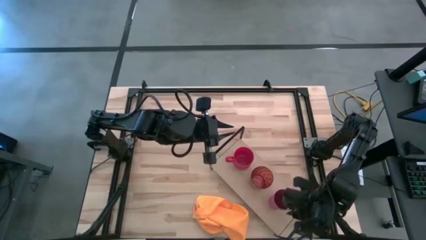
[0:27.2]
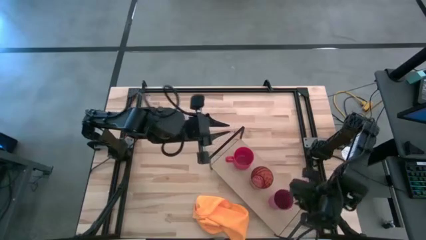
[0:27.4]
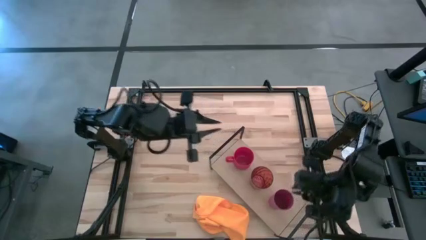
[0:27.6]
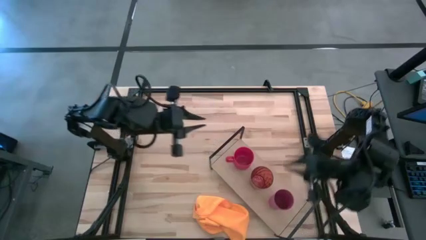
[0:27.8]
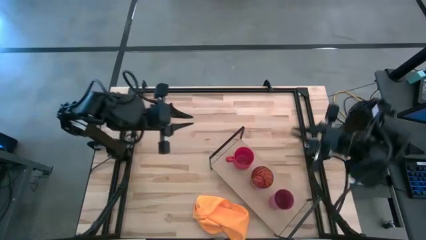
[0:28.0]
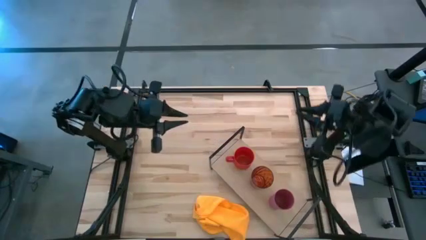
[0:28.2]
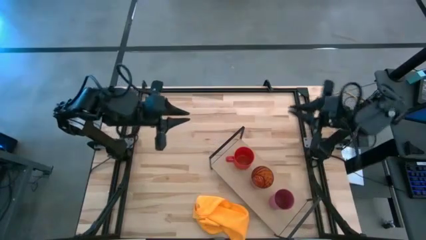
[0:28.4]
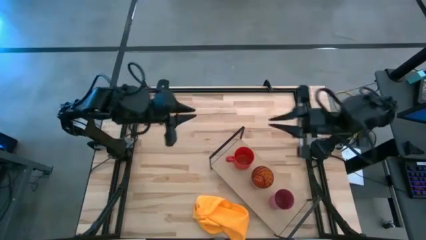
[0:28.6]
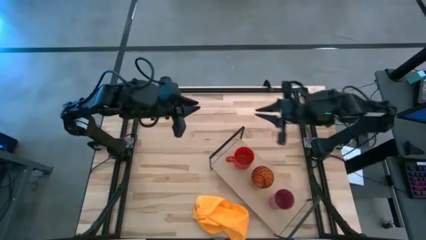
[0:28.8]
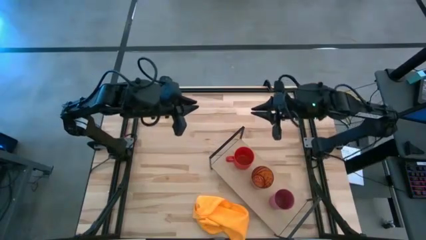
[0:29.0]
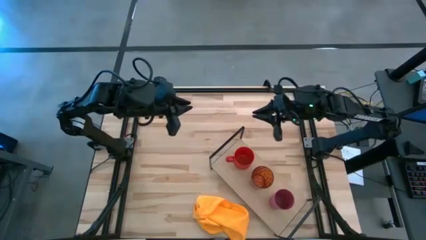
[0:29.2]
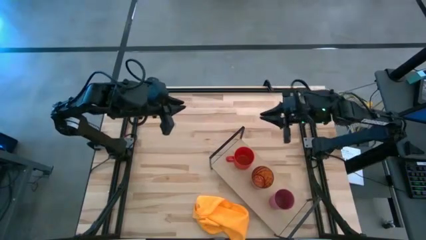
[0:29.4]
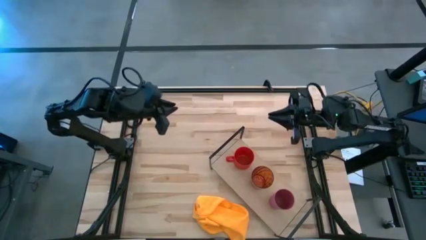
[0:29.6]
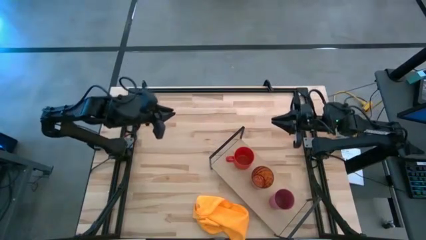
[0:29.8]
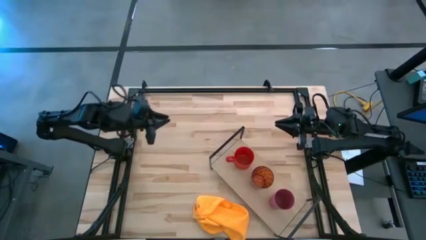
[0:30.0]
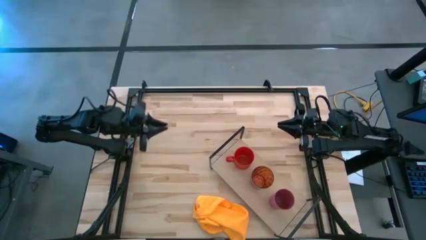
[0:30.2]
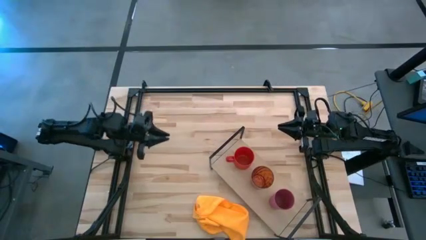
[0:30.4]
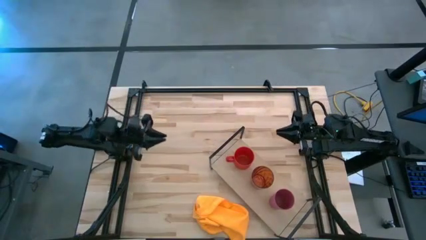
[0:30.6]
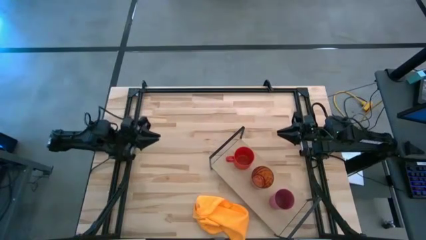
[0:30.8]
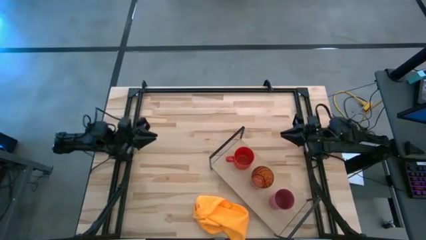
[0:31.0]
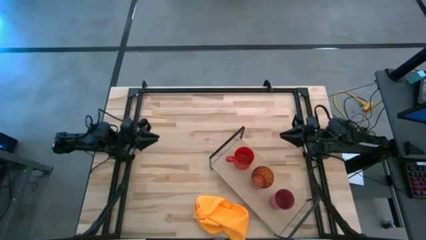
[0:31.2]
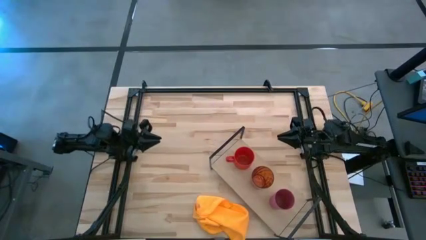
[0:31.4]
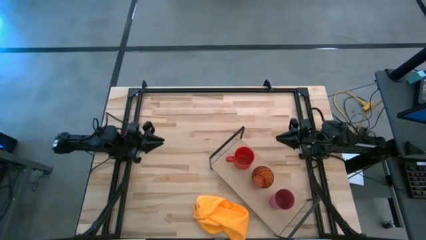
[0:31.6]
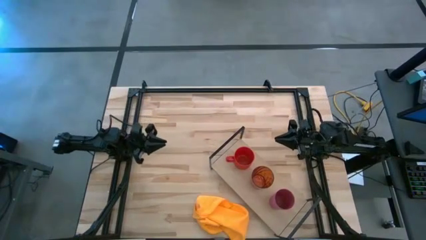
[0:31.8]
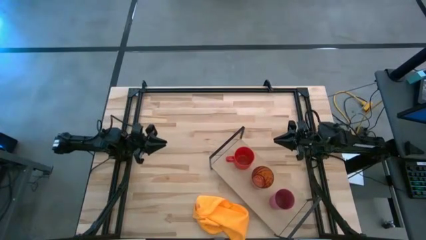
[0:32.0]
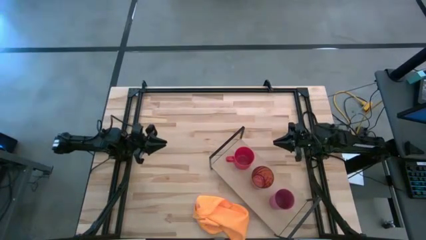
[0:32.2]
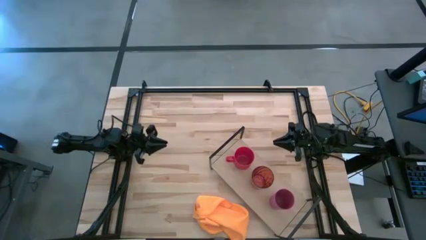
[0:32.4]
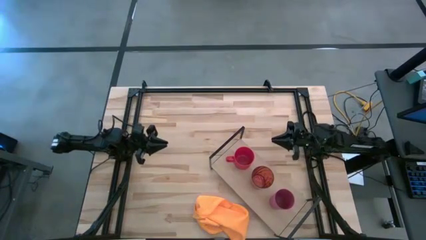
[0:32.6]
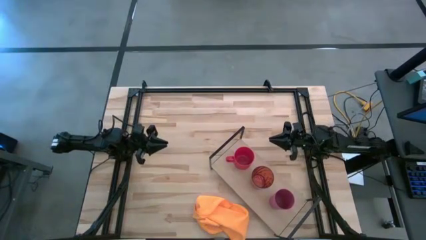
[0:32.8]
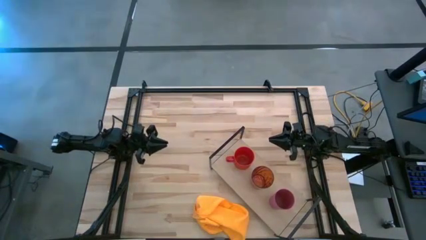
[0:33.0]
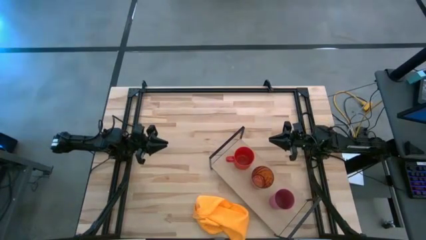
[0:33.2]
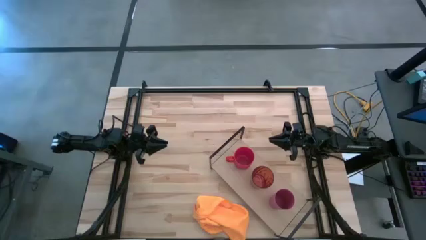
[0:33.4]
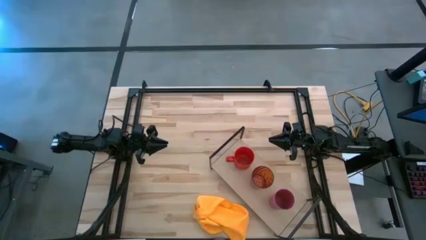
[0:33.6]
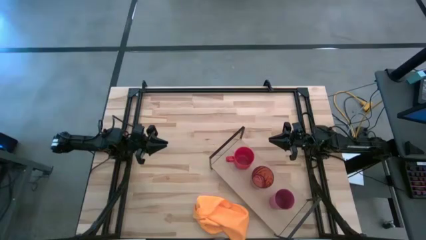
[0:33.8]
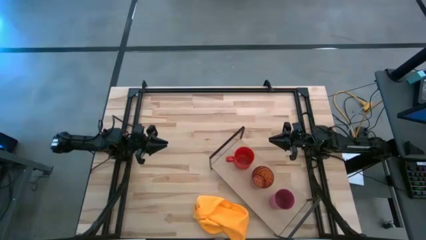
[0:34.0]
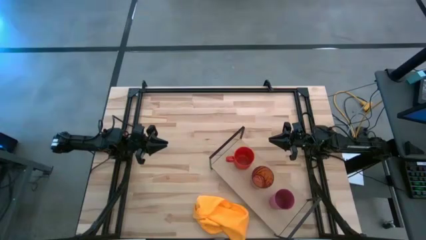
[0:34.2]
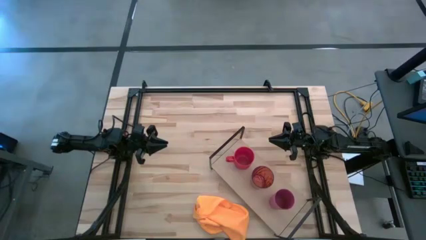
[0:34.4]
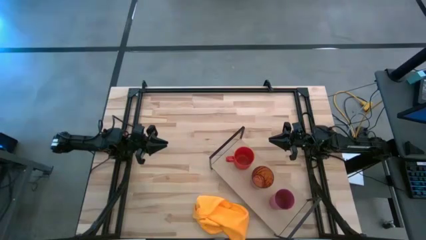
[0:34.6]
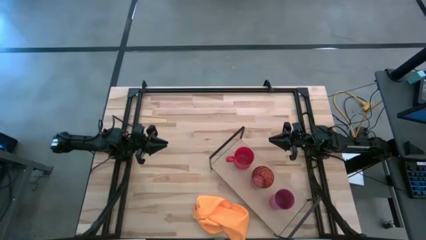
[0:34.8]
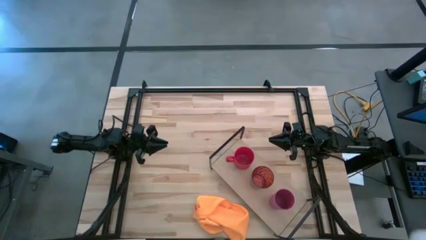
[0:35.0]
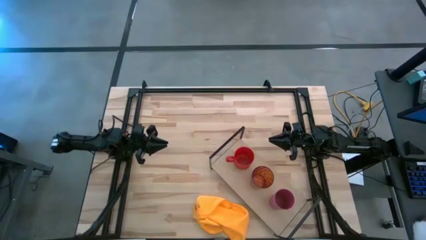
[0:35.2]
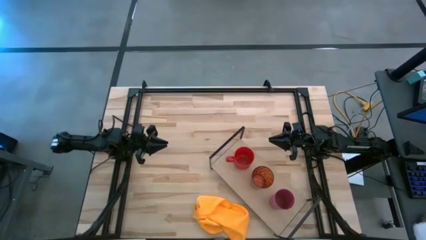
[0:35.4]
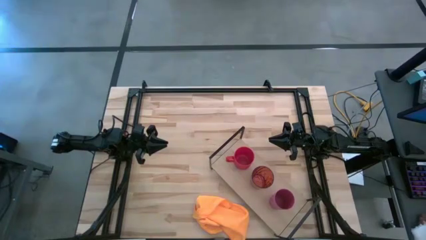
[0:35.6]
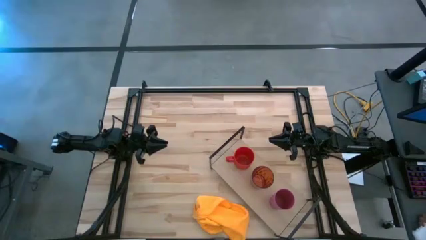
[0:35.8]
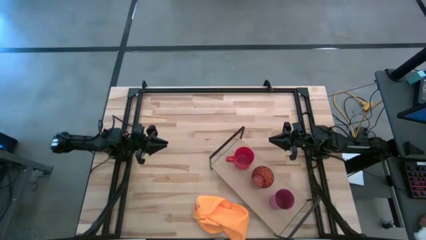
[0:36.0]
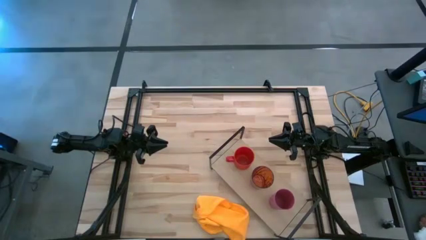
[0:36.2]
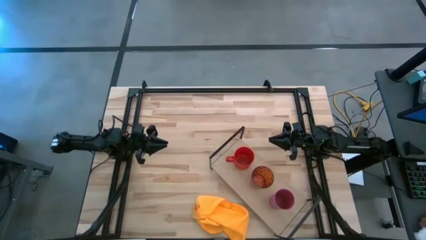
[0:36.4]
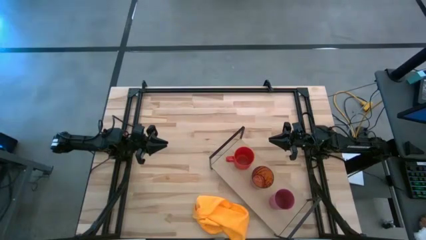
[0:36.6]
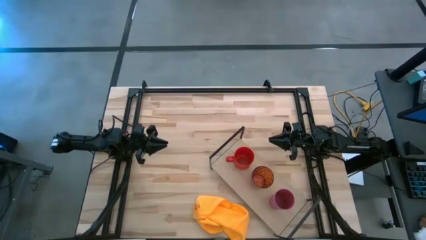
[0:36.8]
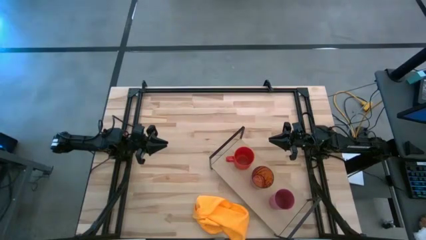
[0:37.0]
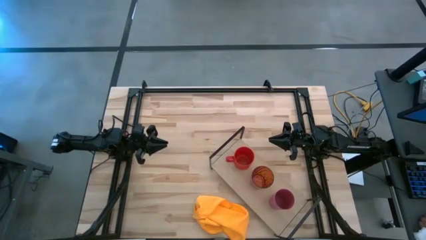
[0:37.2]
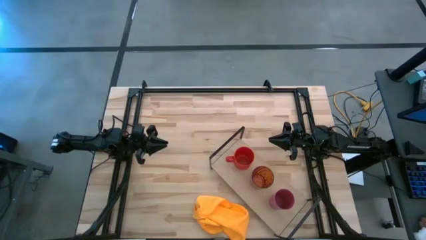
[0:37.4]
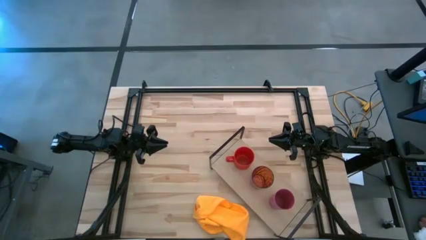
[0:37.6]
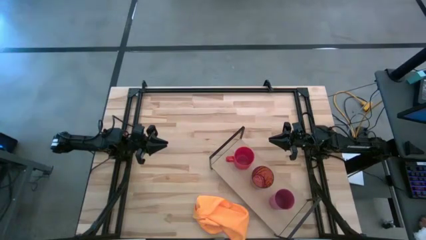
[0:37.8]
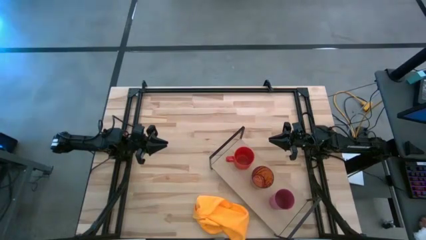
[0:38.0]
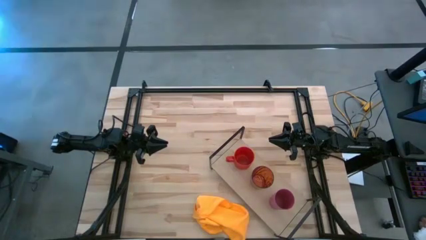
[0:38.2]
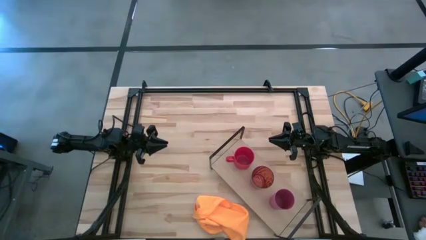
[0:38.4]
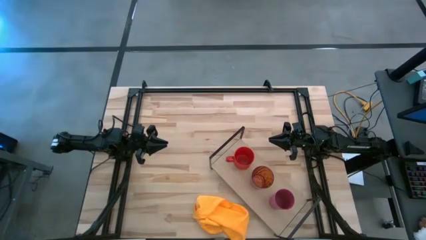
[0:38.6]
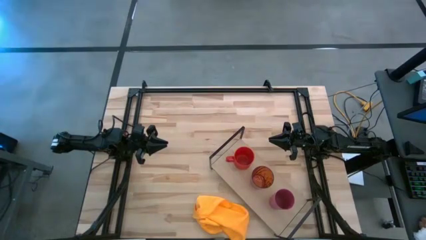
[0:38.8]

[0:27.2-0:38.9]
Task: Stack small to large cups/mugs on shelf
Return to Home Position

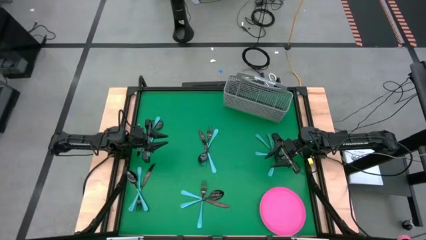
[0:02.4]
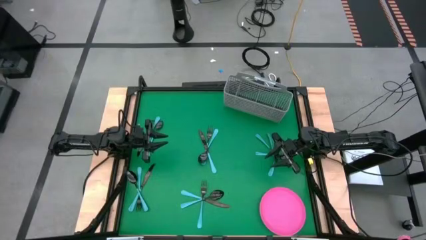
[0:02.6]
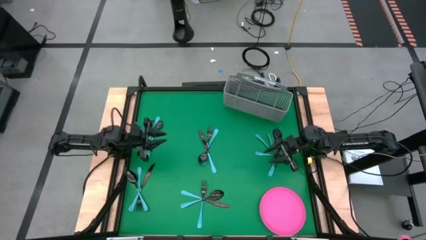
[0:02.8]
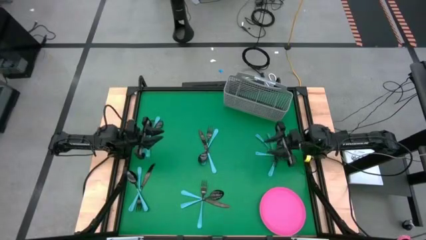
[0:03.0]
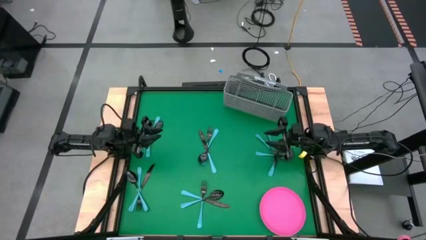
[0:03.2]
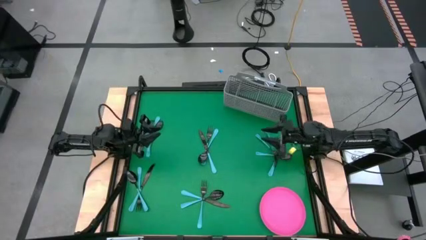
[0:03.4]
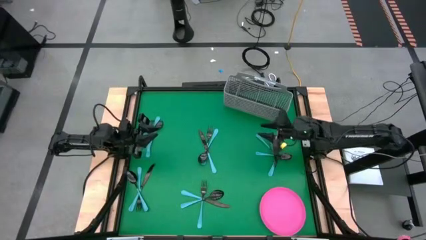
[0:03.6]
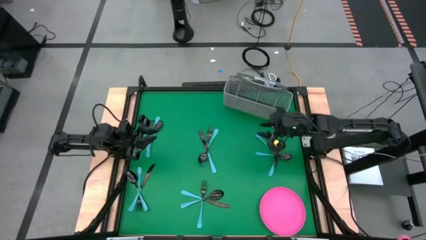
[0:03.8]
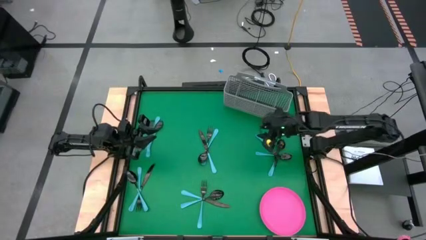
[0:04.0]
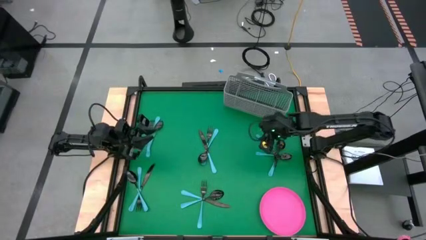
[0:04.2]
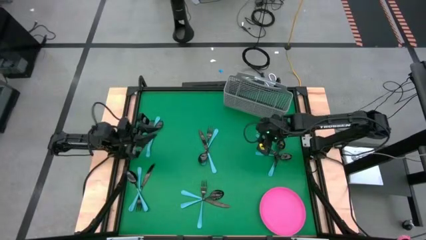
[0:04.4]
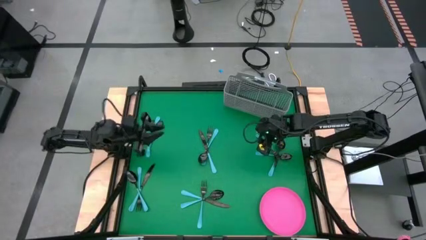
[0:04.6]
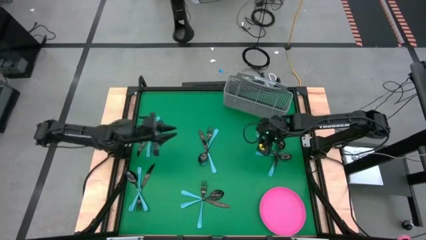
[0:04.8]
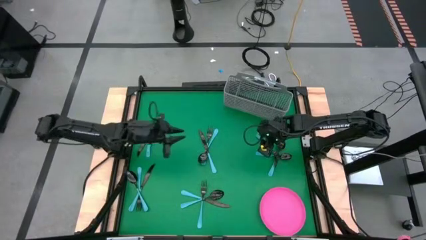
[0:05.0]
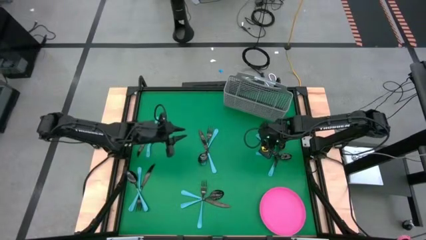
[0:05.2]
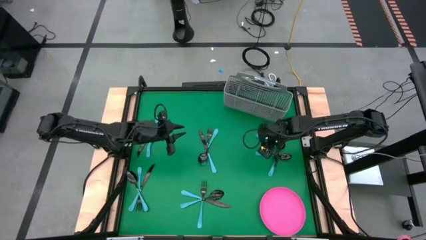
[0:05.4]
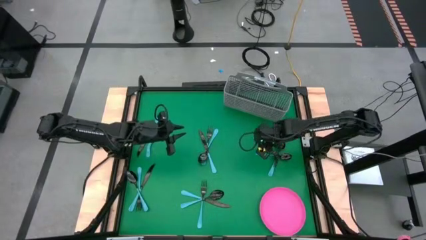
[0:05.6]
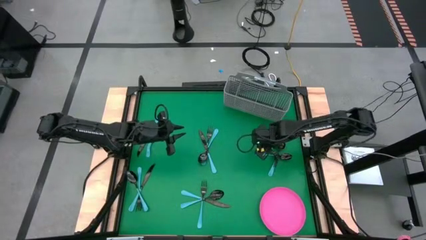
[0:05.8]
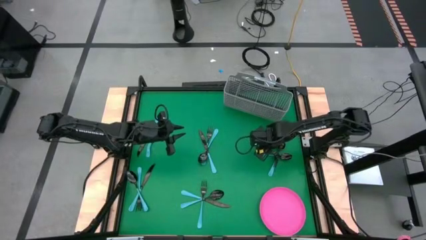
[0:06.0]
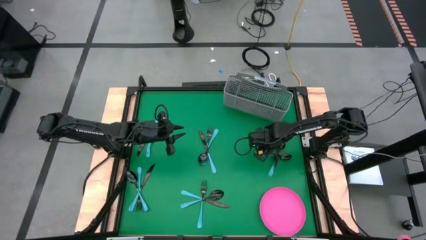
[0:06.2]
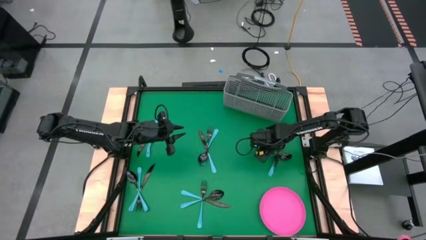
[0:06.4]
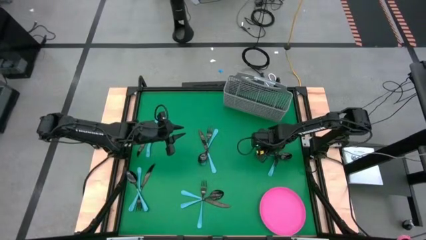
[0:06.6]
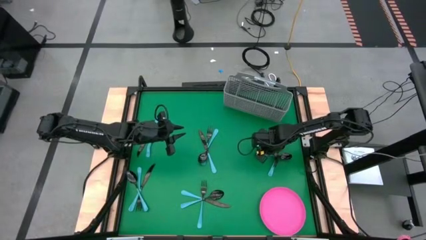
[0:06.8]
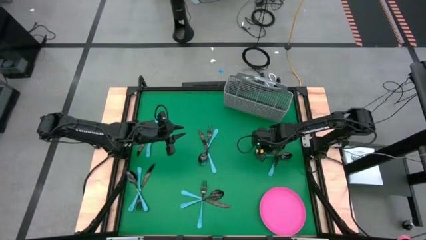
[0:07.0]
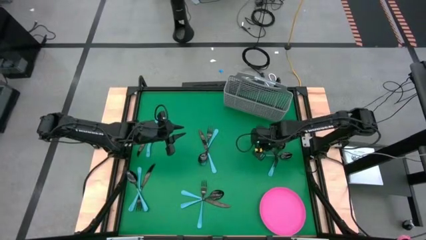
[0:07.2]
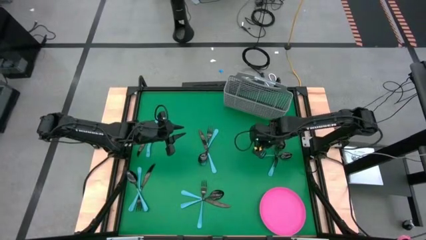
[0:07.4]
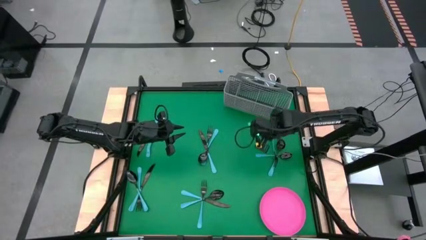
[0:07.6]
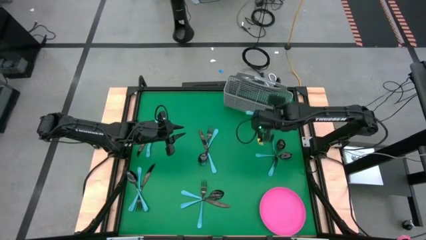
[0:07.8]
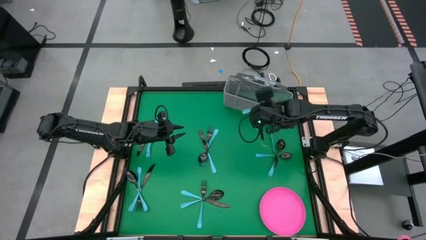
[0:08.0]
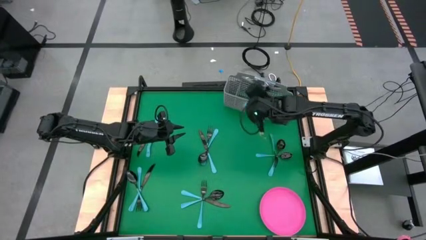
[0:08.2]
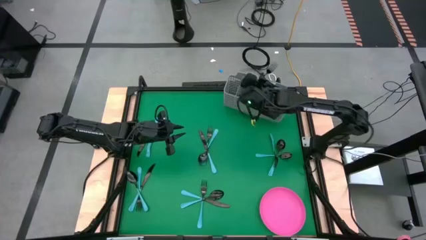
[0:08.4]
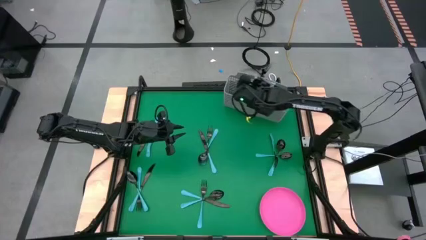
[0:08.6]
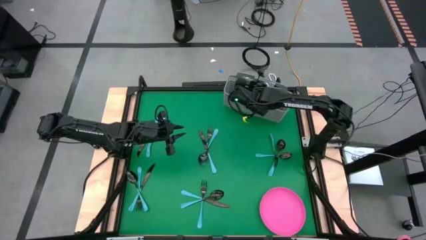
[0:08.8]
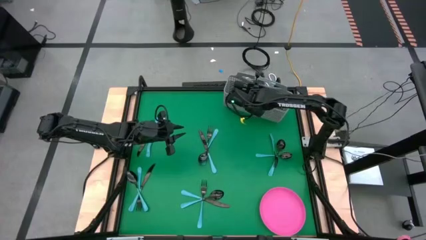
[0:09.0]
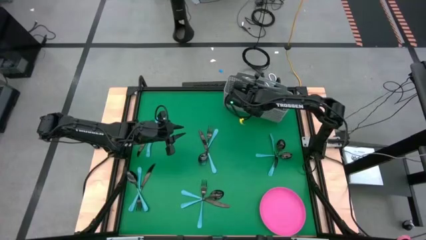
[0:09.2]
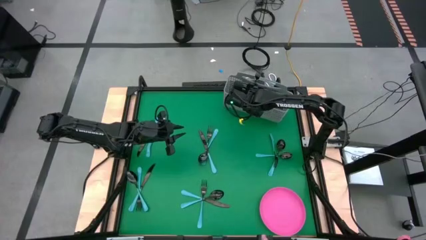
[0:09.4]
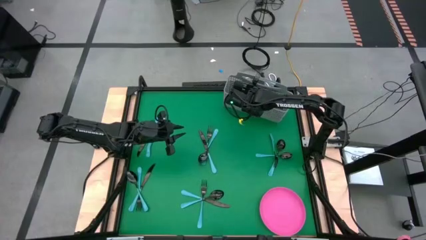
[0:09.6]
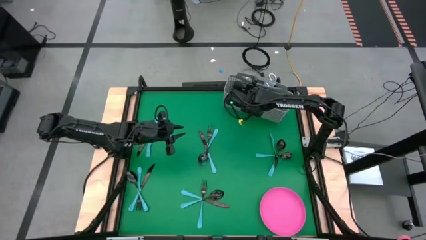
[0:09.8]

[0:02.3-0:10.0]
Task: Sort silverware
Put the blue fork into the silverware basket
